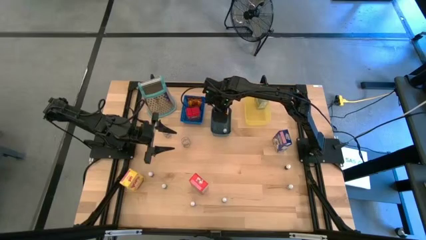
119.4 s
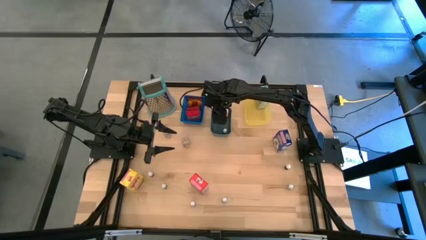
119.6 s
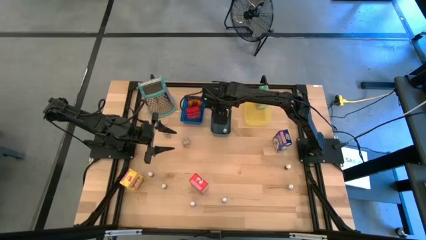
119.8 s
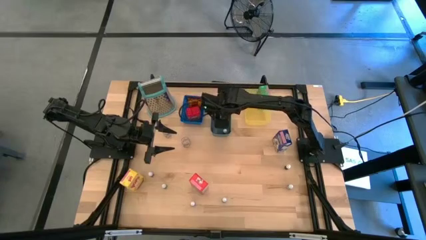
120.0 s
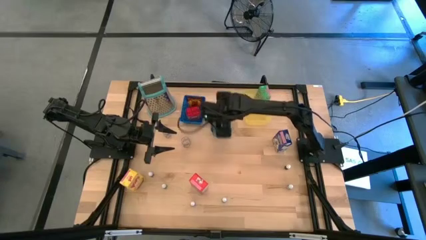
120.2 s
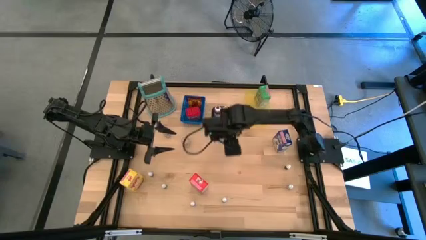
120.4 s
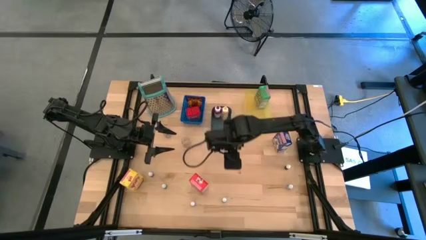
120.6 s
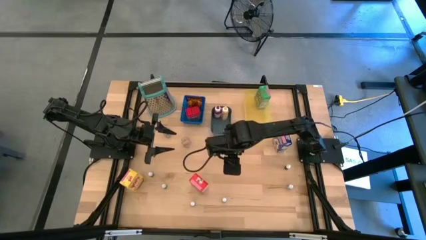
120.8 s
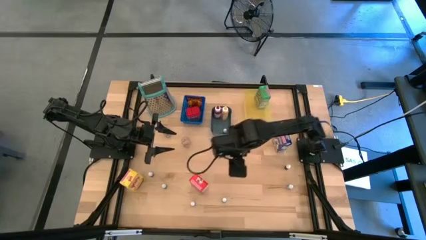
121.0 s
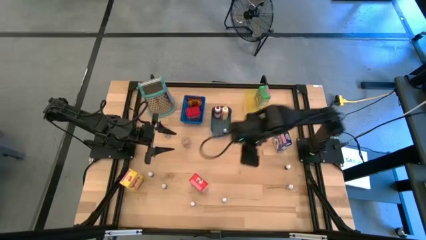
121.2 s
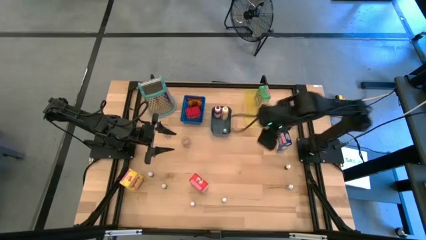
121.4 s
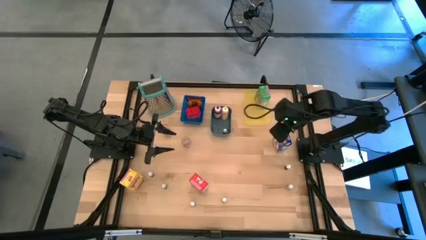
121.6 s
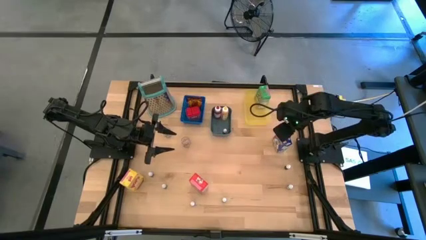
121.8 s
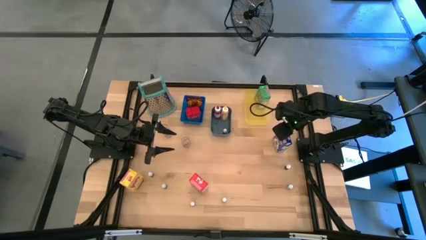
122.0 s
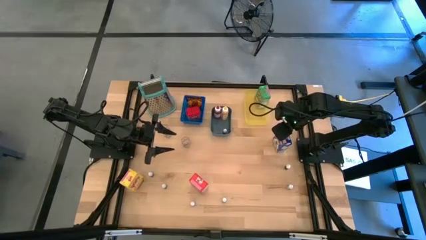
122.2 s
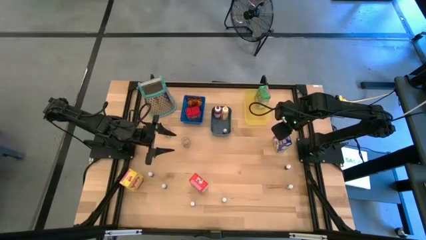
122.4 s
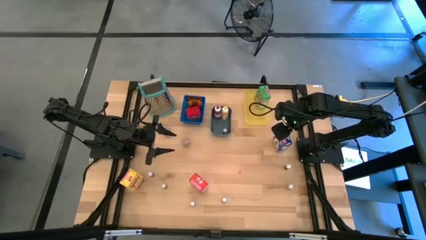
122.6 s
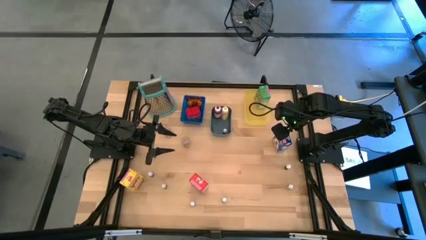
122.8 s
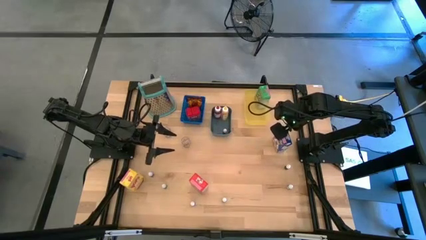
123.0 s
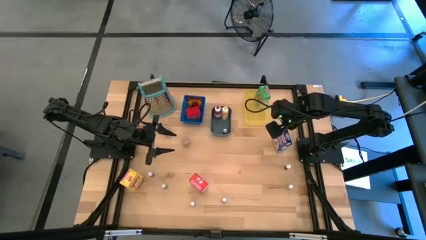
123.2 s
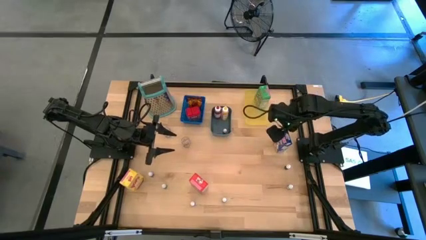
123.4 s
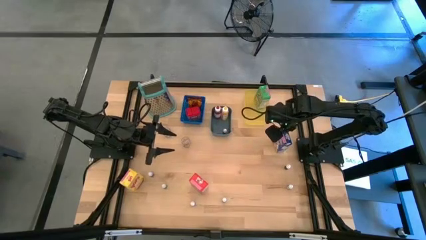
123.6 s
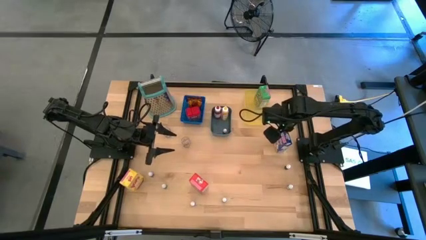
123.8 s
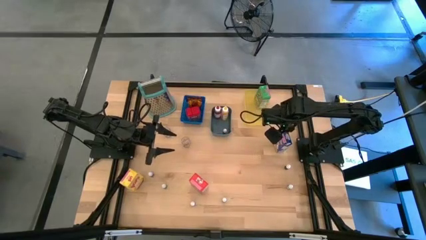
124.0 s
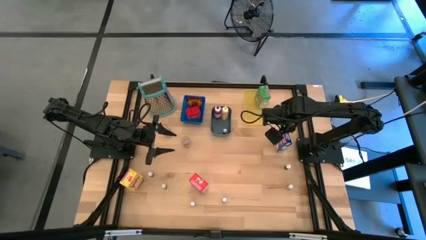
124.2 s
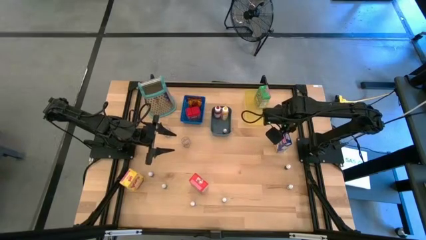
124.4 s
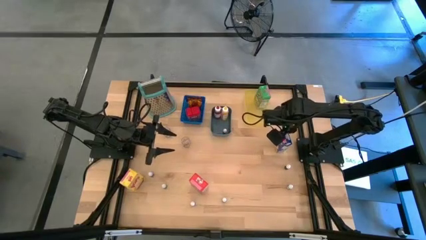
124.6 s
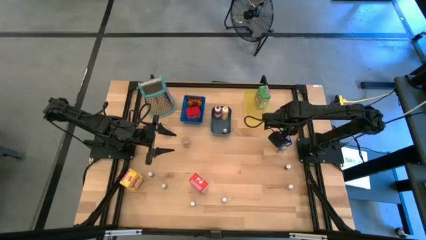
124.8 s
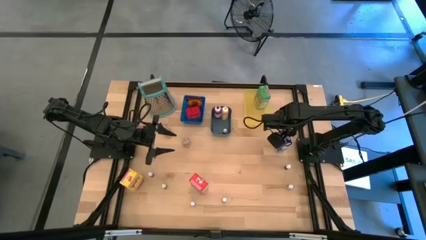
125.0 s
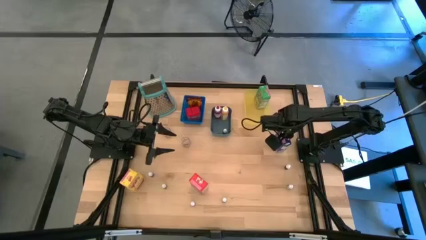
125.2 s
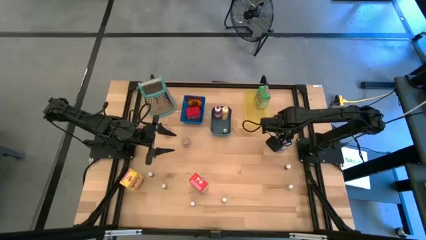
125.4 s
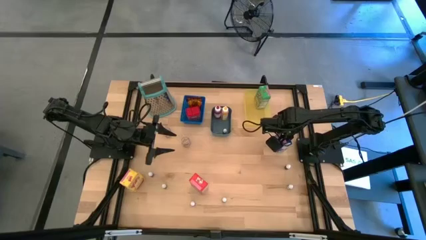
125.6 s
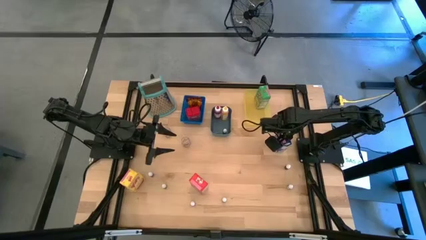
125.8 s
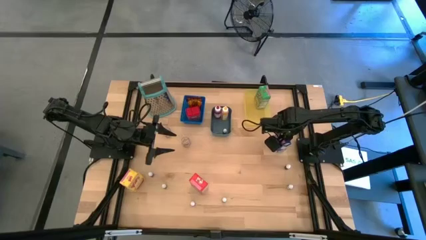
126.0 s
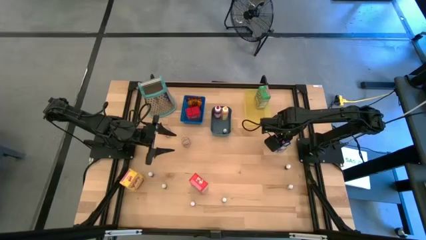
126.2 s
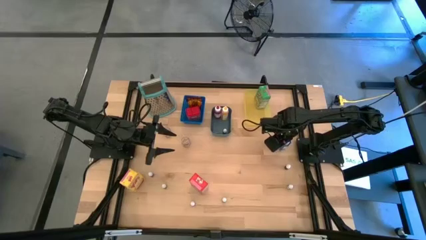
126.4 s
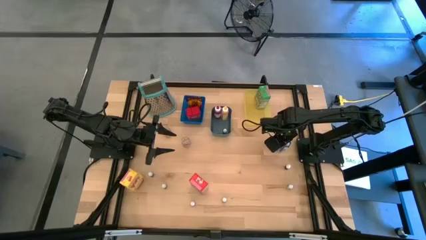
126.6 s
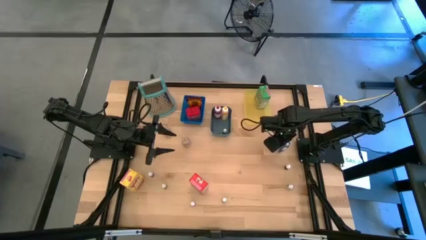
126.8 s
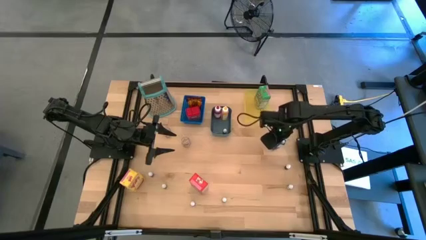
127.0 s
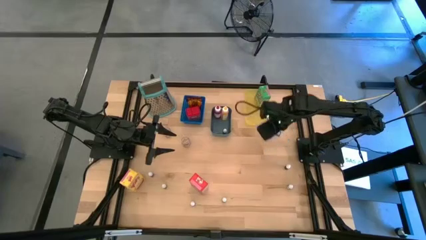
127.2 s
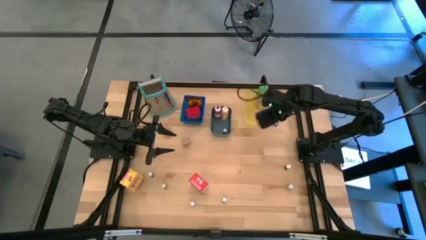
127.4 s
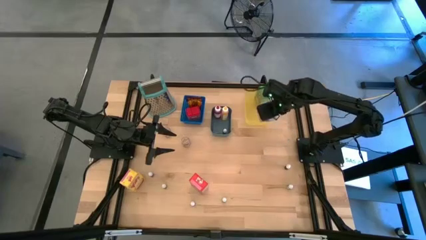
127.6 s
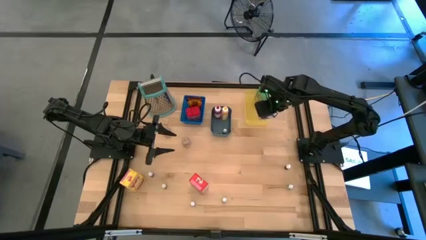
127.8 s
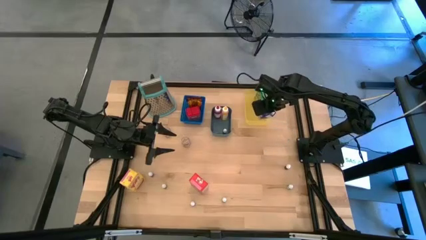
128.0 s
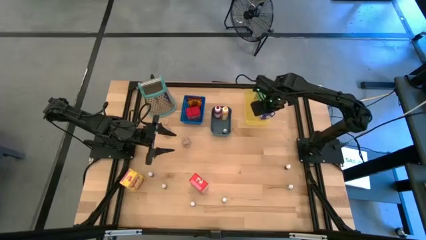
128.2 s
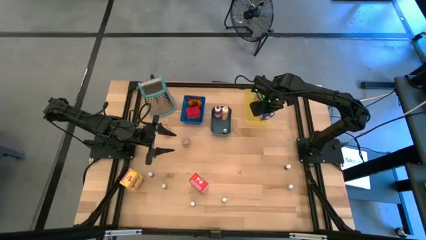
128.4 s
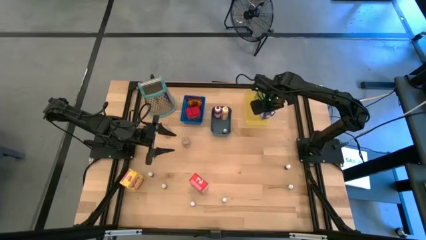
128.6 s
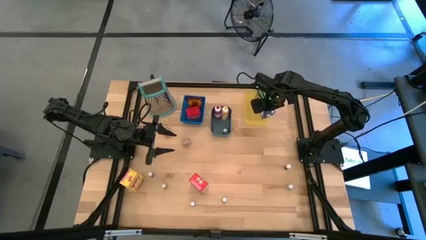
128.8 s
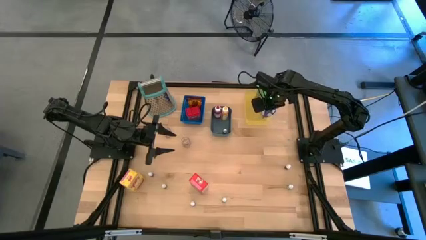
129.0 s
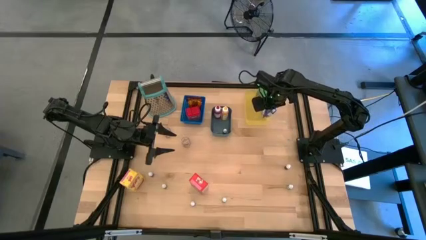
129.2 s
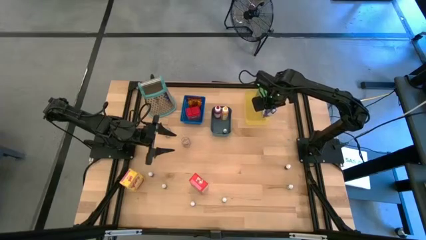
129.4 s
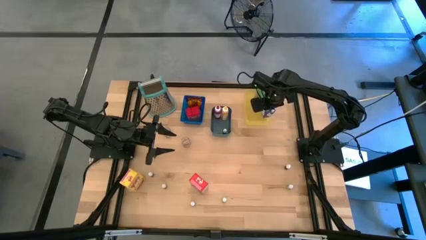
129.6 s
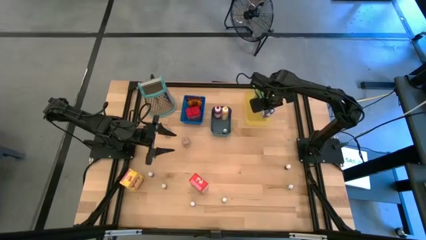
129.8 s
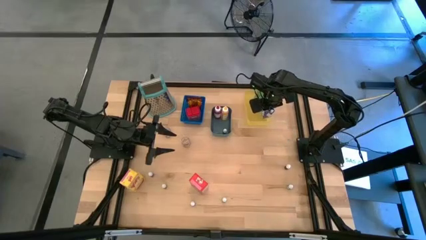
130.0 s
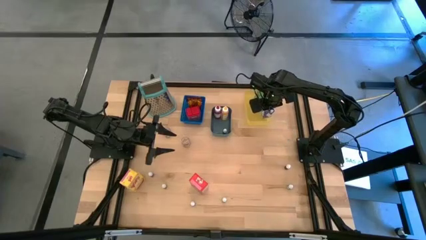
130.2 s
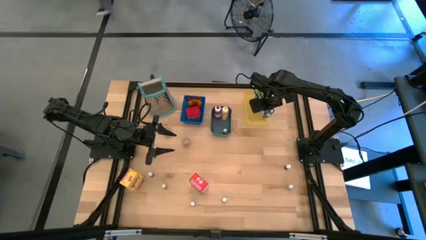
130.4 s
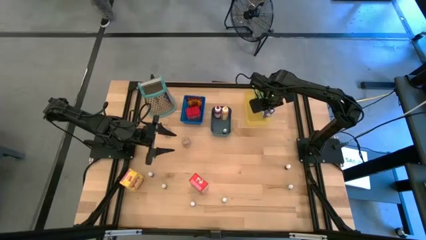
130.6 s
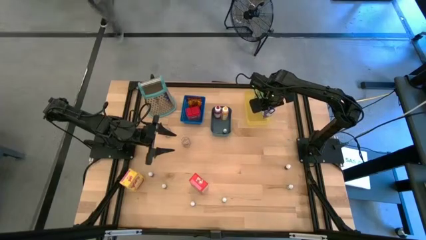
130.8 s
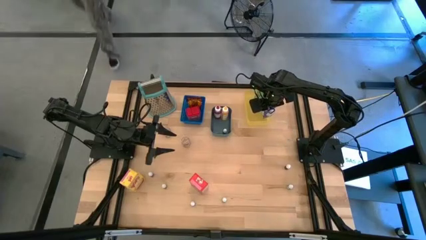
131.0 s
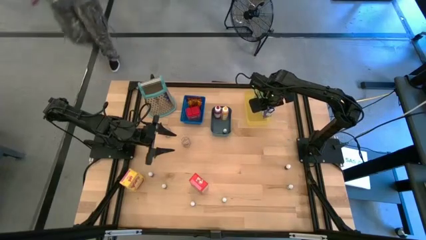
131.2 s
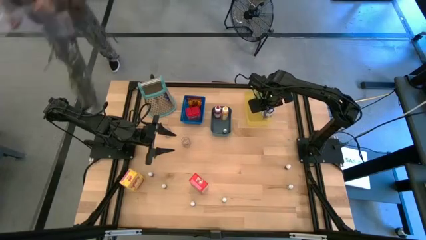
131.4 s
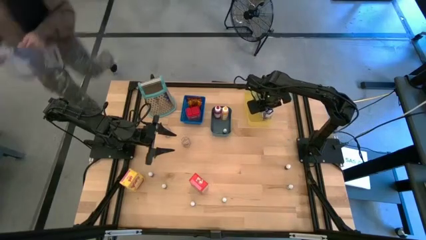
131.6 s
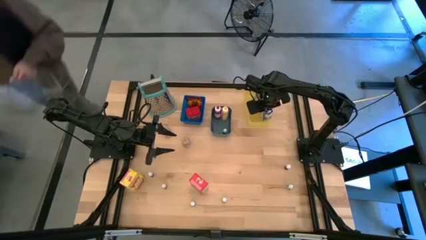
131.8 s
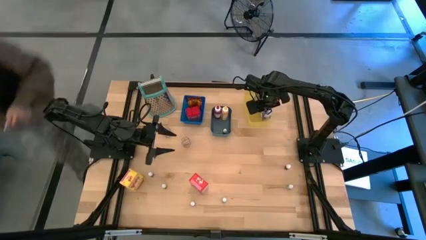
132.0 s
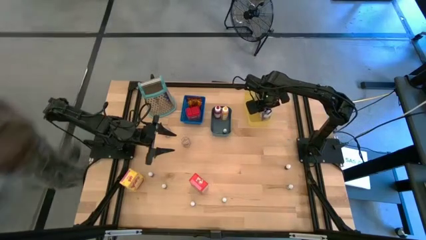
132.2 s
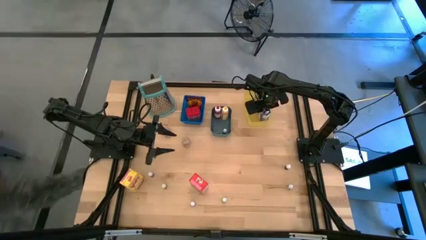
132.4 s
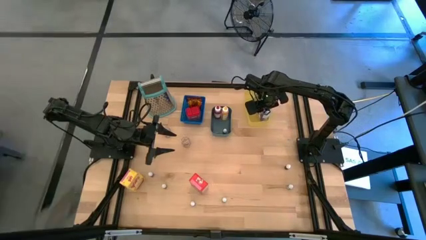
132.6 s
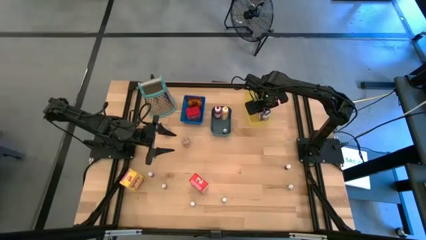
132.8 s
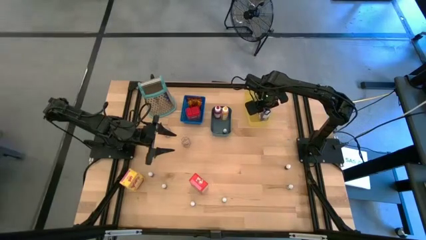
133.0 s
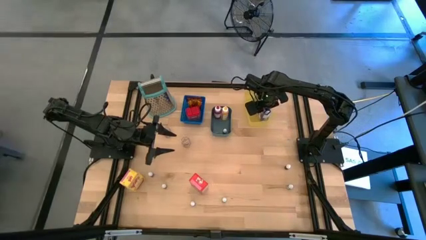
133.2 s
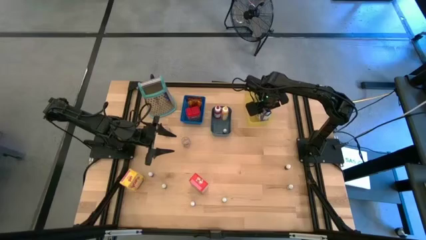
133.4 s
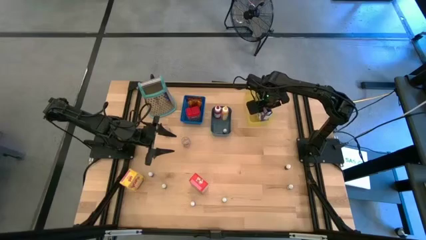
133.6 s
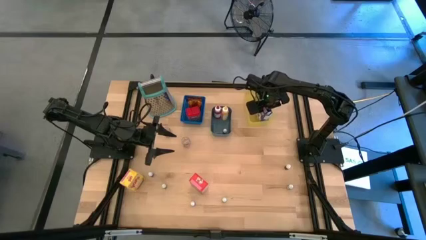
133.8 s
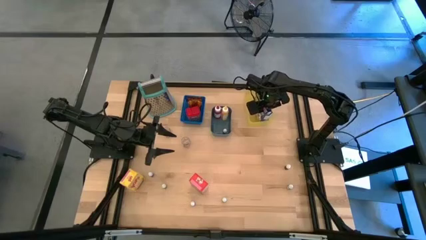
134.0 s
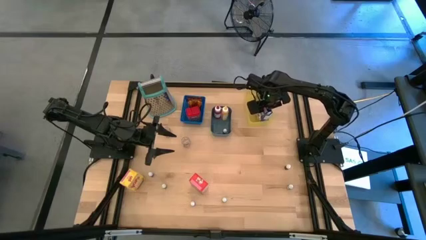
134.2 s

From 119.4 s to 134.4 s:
Task: Pick & Place Kitchen Items
Put the blue cereal box into the yellow bin

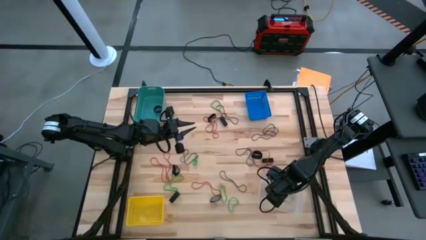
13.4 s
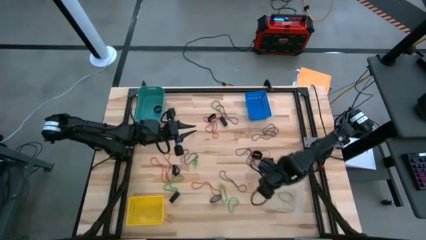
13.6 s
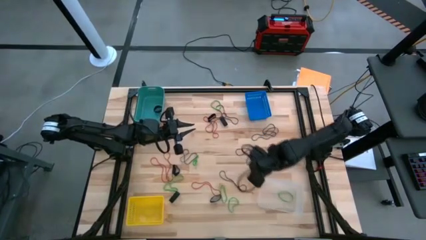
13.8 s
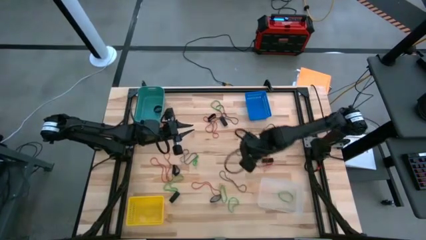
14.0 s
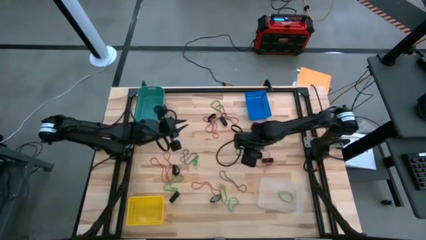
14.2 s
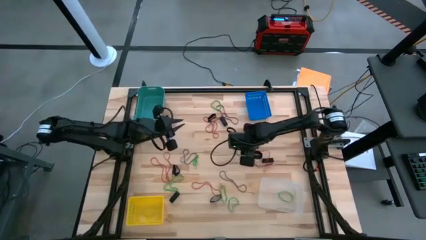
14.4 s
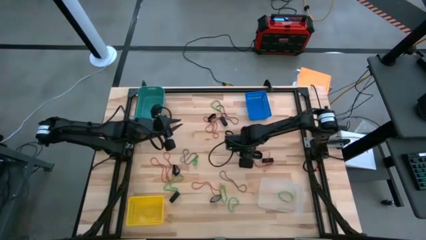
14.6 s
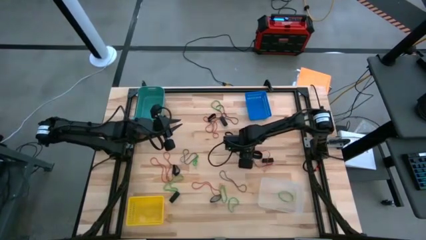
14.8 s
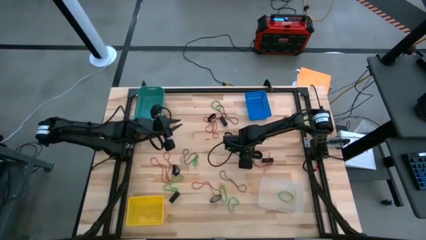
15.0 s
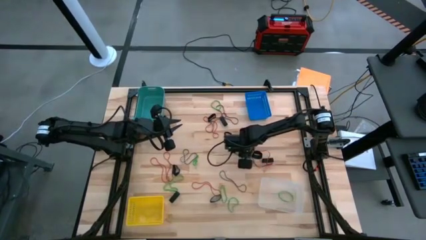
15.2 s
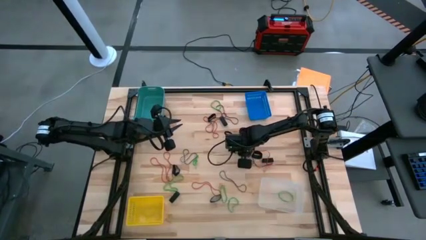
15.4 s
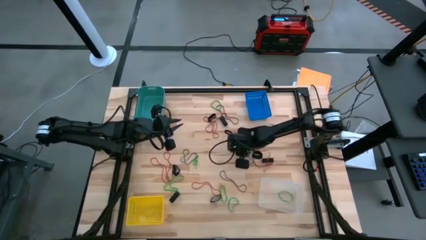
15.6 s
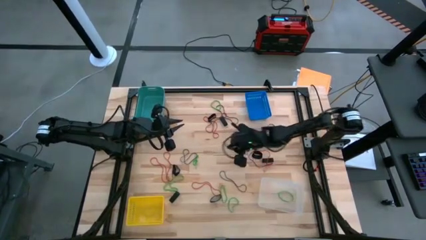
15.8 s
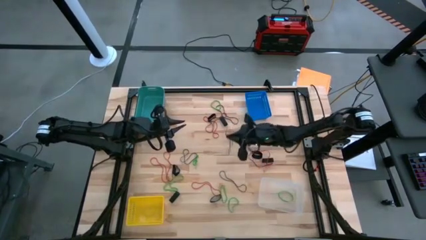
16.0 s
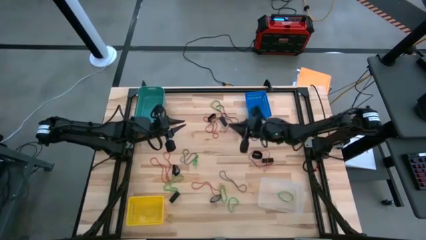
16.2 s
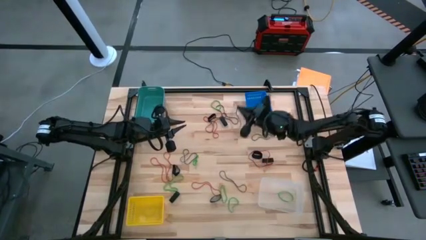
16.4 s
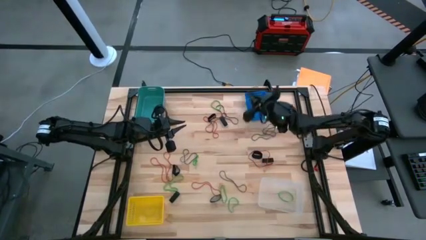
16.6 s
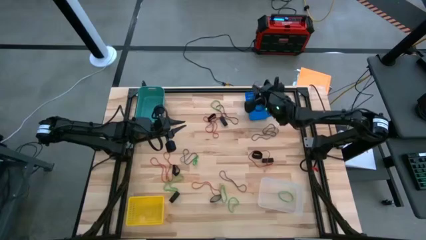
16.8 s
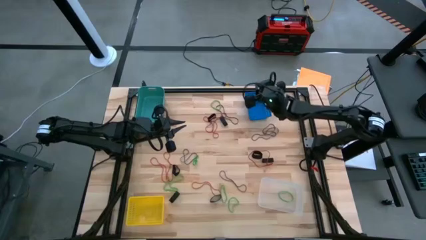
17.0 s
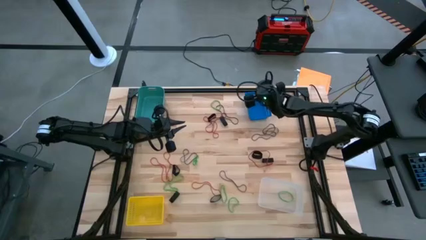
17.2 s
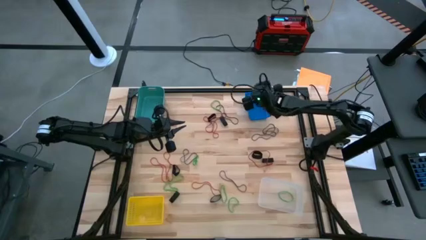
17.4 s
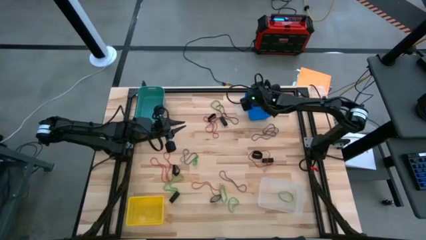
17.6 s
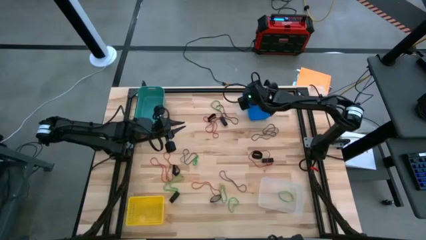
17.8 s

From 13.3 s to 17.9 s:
Task: Sort rubber bands into baskets
Put the thin black rubber band into the blue basket
